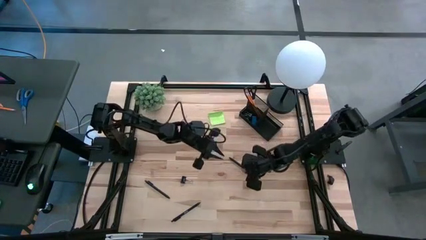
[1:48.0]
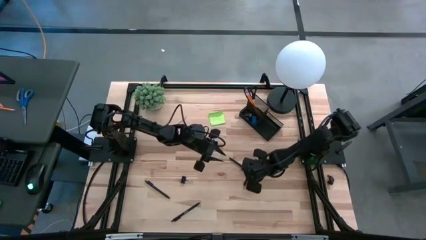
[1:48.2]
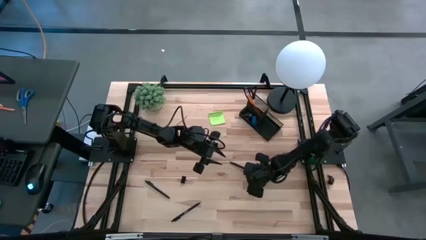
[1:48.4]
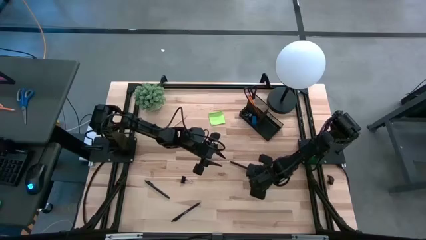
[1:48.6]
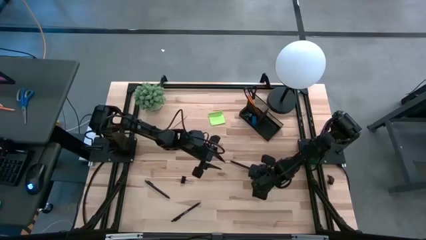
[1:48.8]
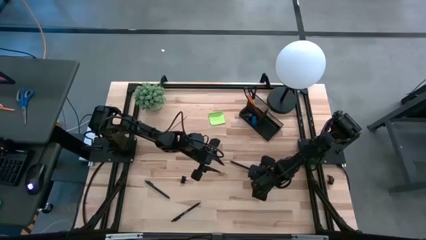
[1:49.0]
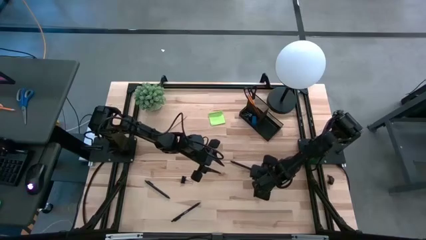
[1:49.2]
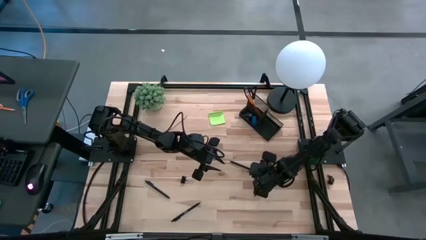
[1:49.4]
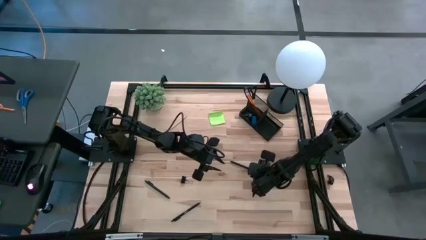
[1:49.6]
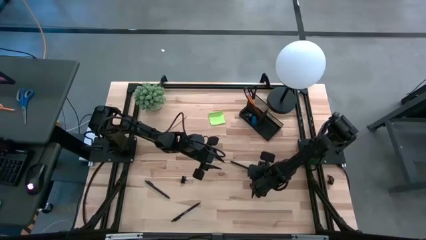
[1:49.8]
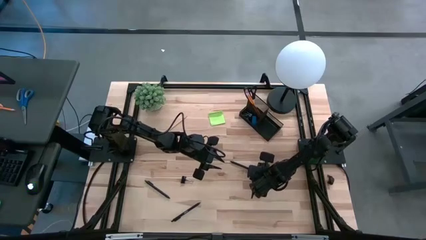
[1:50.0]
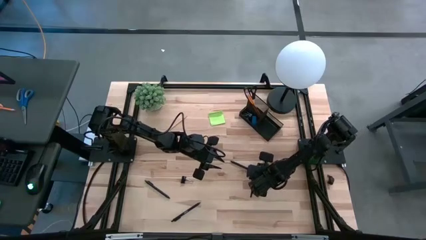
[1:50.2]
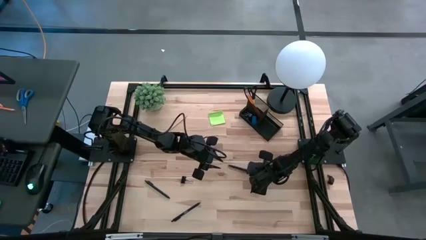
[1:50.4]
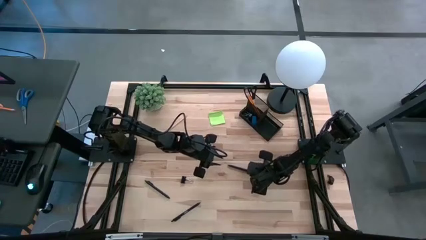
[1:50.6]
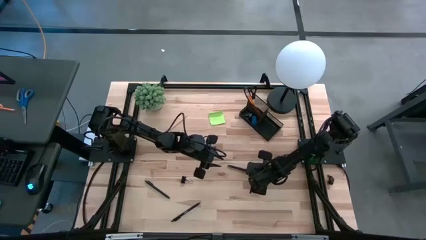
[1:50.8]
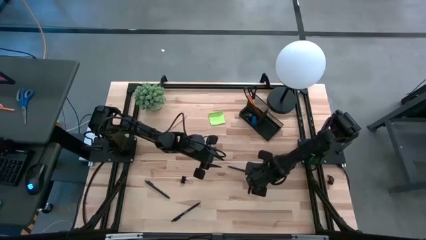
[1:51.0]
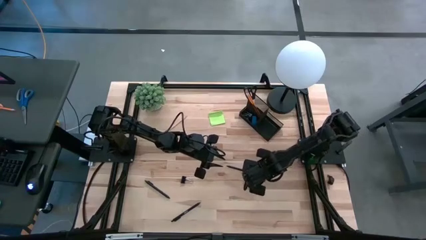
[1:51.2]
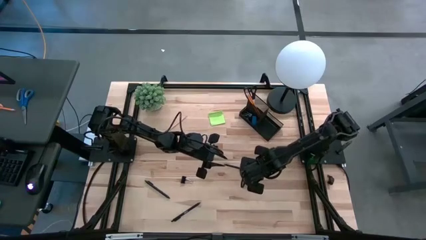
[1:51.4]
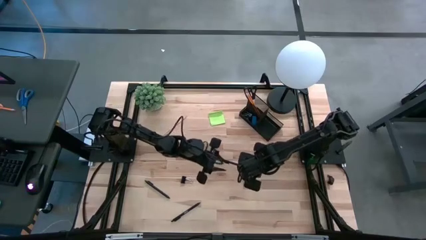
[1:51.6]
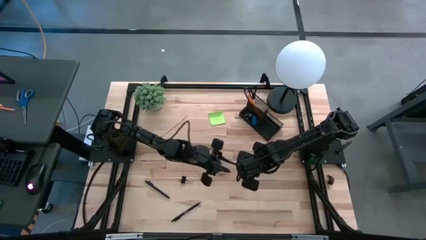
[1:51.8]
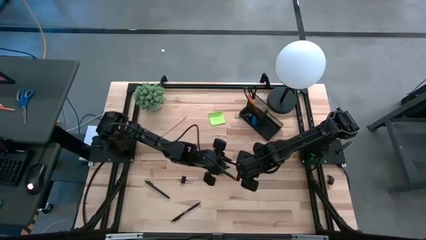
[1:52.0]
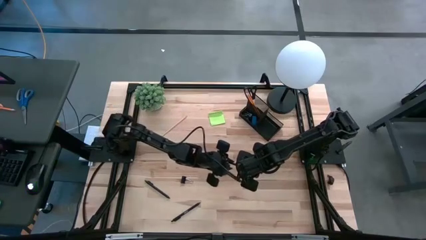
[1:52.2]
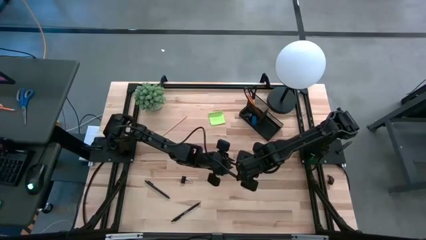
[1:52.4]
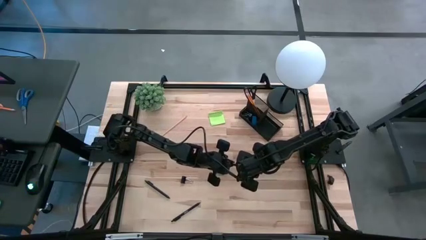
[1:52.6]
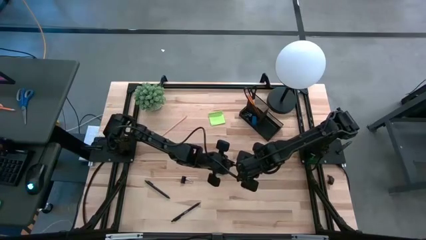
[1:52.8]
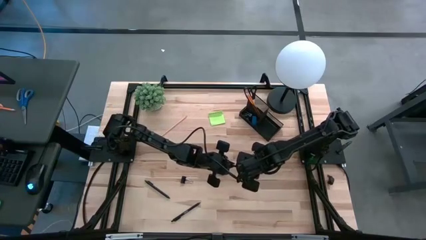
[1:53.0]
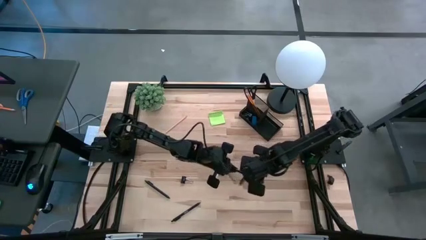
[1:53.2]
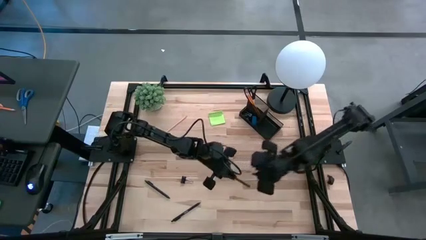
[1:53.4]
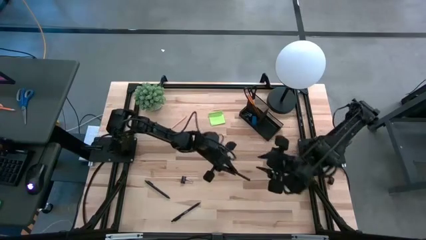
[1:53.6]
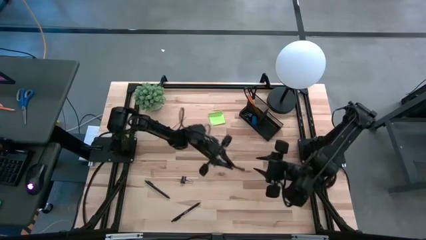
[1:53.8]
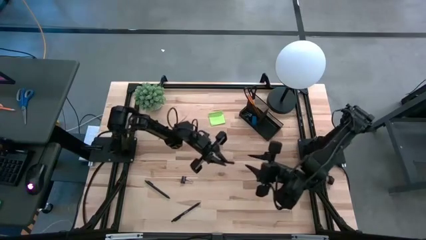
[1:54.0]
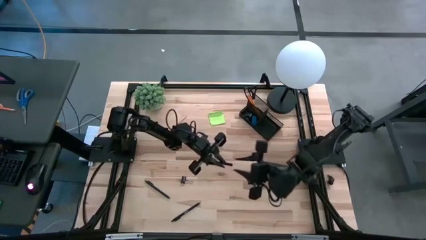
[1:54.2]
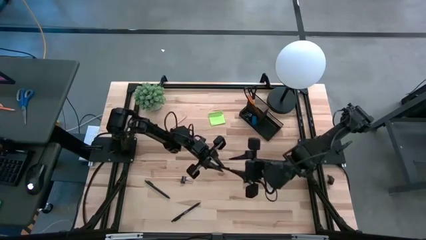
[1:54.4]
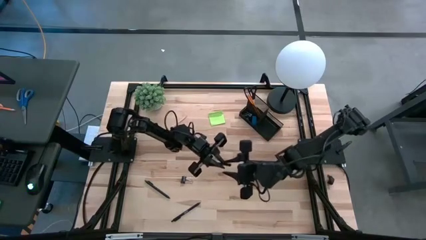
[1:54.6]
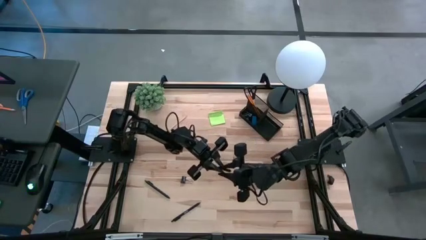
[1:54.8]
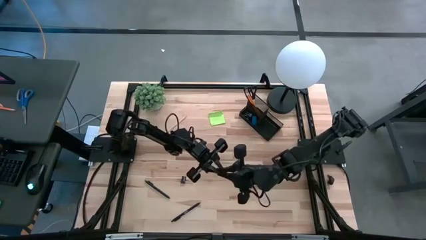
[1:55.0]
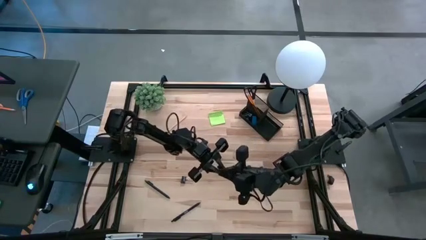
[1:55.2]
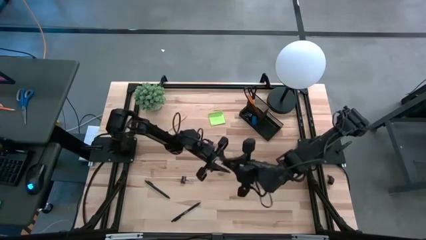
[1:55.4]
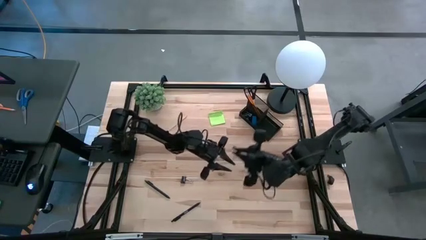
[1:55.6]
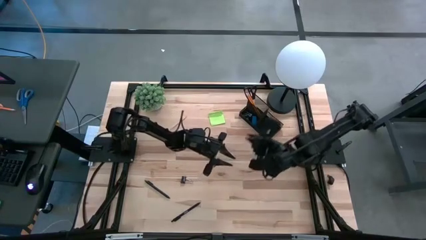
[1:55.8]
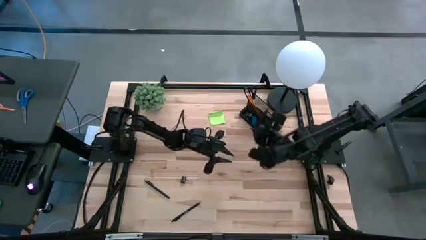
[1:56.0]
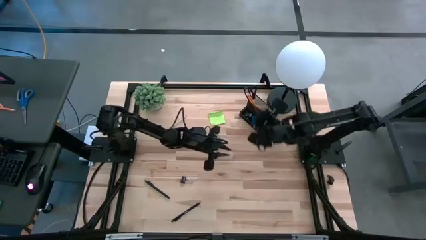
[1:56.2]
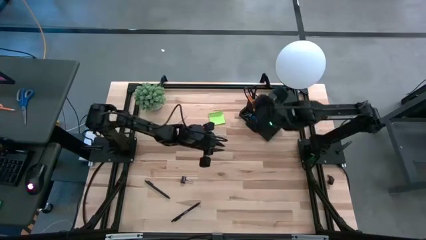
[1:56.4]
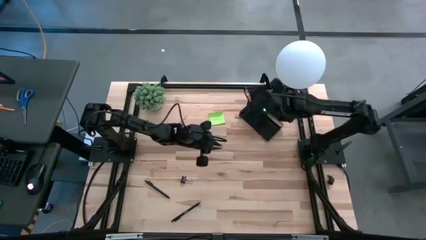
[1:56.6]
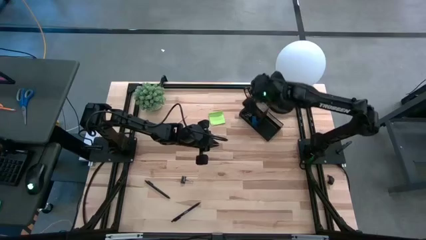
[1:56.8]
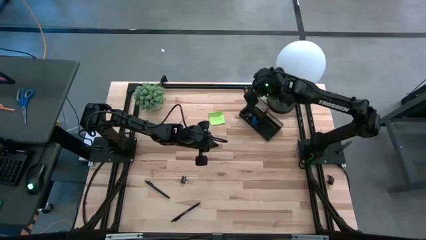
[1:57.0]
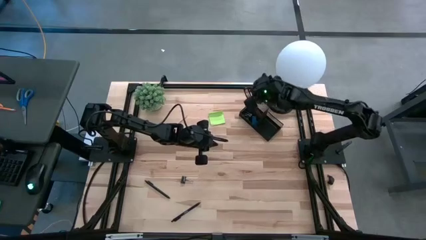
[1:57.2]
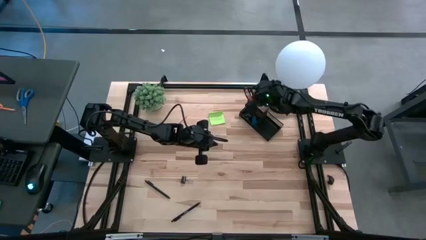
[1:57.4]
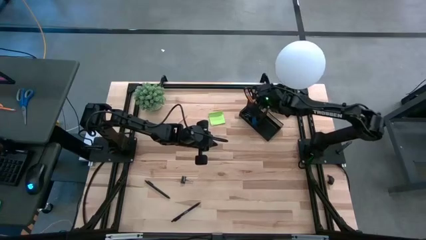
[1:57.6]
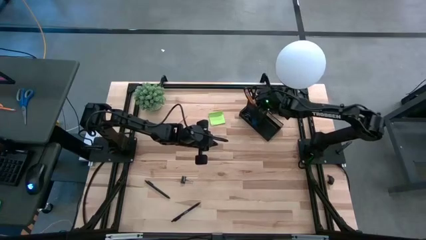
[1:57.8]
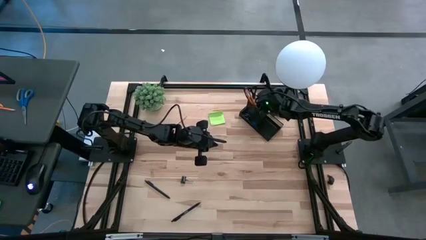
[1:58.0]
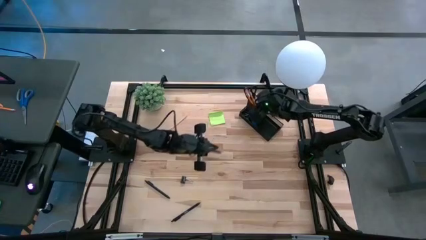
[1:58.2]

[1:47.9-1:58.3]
Task: Pick and place office supplies into organizer
Put the black pen into the black desk organizer

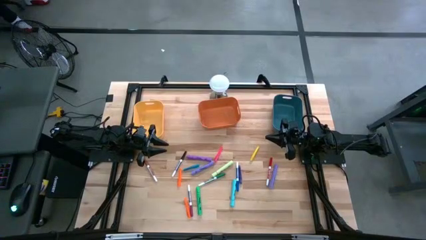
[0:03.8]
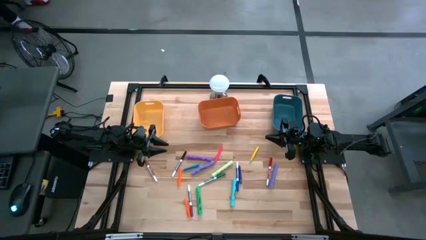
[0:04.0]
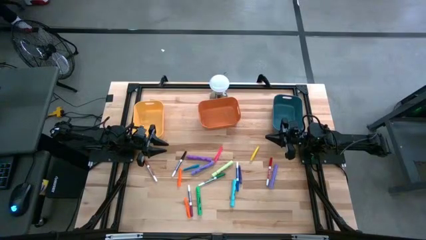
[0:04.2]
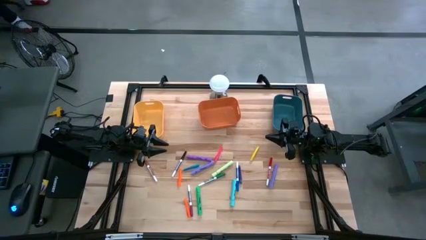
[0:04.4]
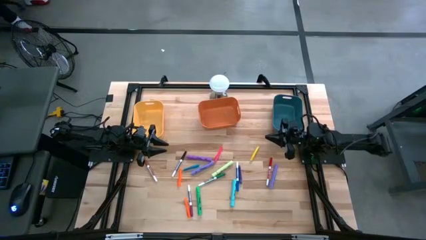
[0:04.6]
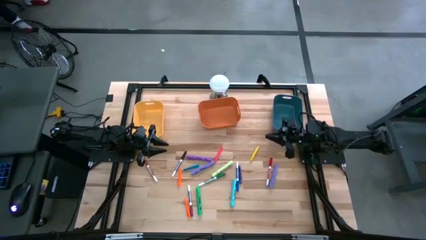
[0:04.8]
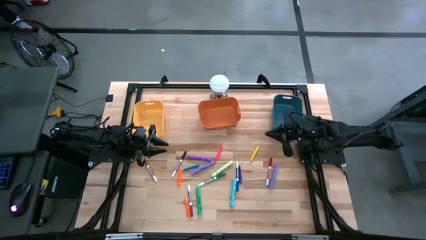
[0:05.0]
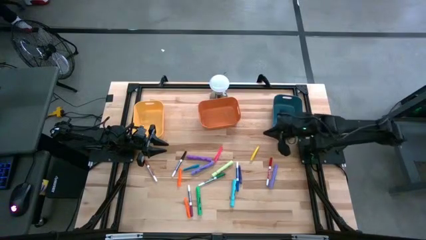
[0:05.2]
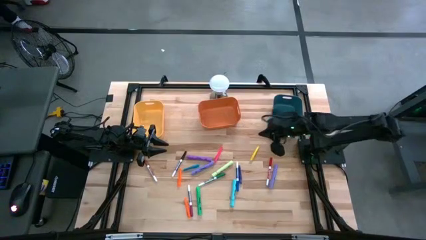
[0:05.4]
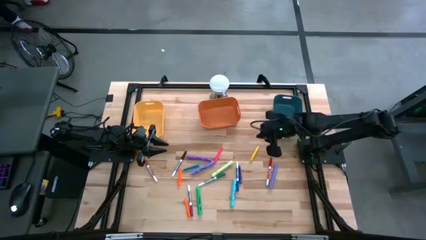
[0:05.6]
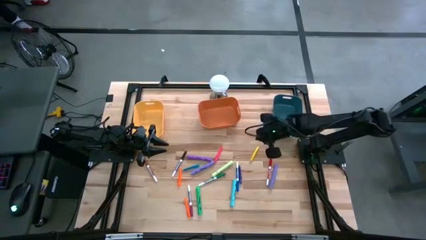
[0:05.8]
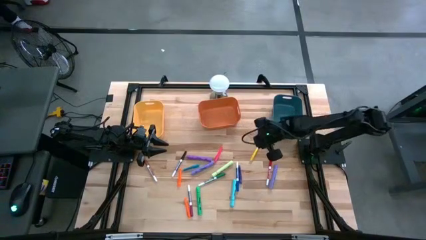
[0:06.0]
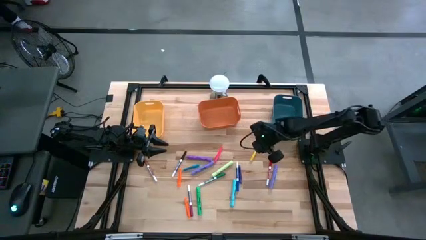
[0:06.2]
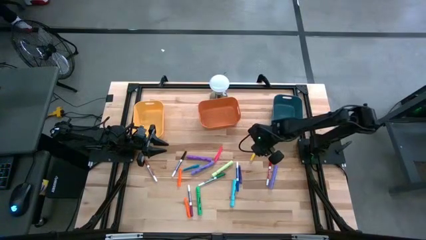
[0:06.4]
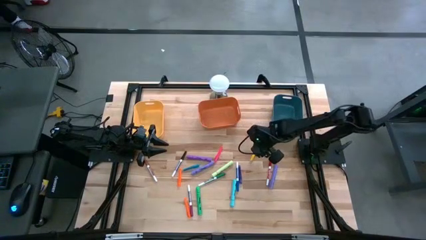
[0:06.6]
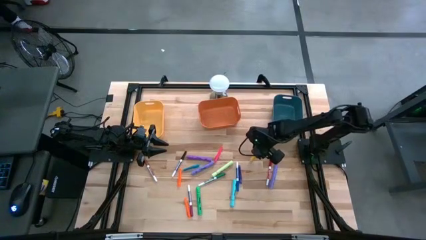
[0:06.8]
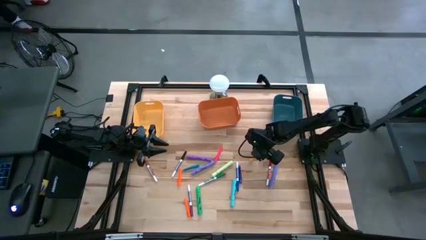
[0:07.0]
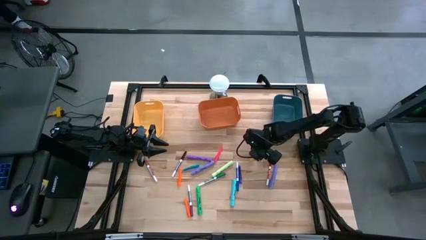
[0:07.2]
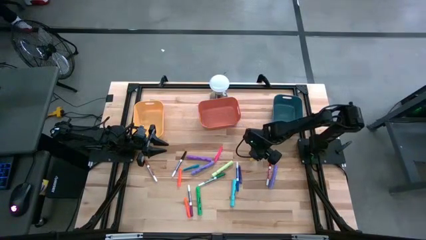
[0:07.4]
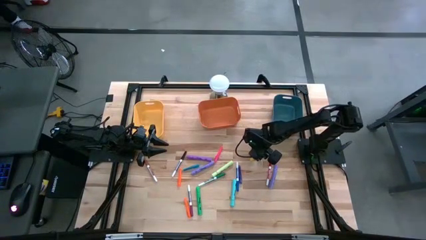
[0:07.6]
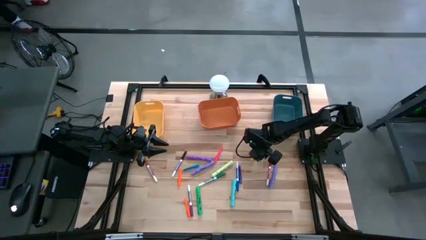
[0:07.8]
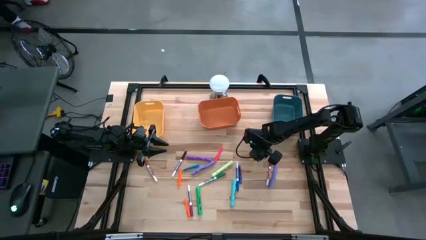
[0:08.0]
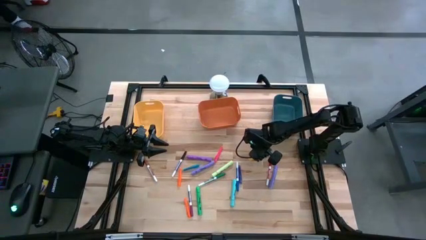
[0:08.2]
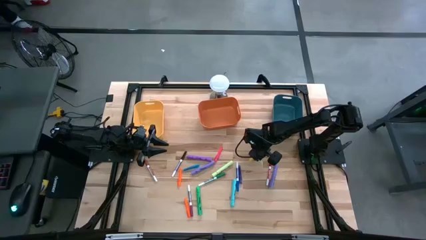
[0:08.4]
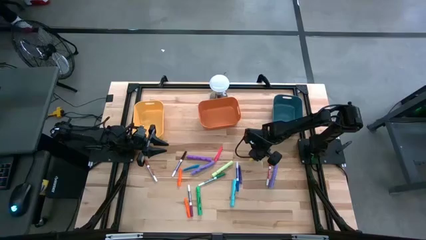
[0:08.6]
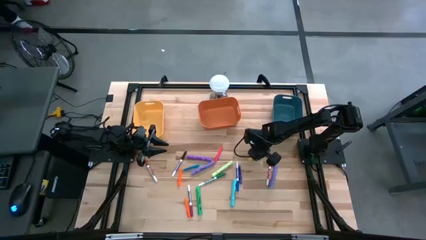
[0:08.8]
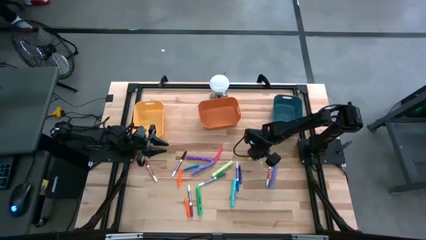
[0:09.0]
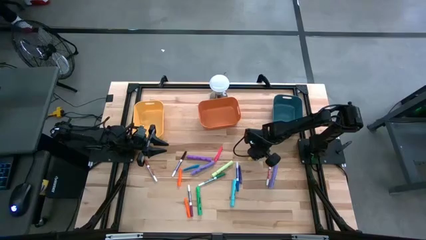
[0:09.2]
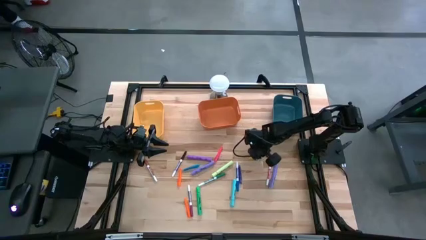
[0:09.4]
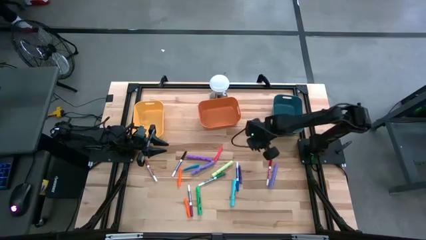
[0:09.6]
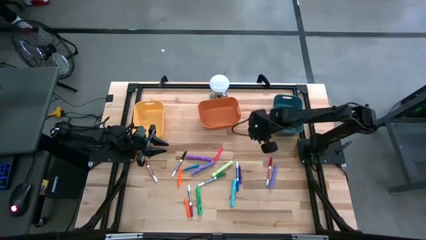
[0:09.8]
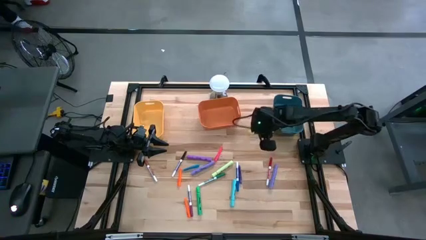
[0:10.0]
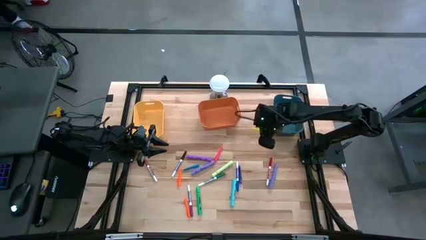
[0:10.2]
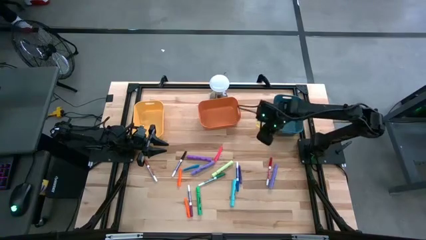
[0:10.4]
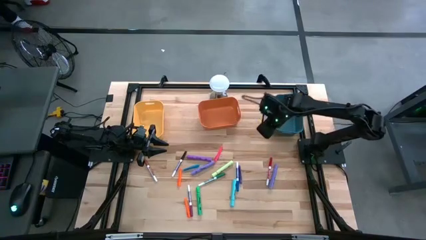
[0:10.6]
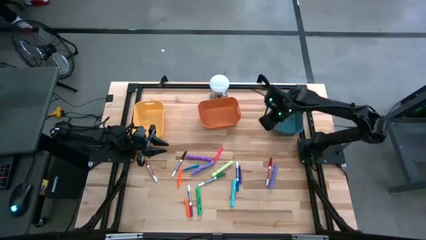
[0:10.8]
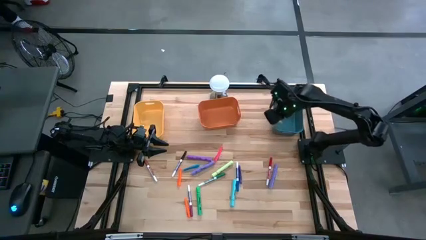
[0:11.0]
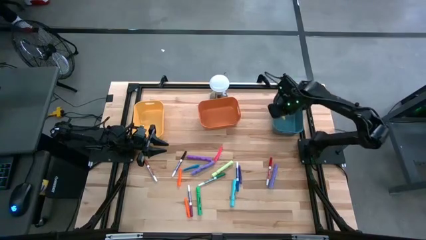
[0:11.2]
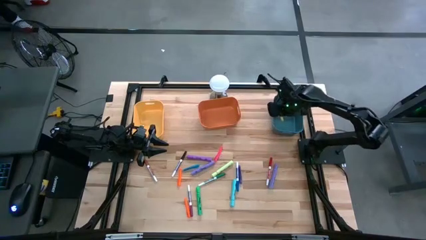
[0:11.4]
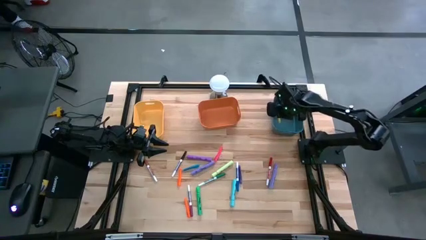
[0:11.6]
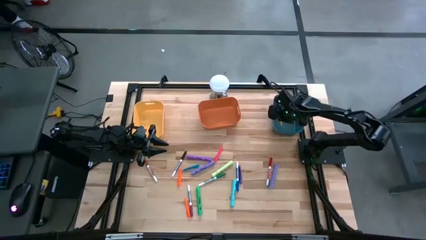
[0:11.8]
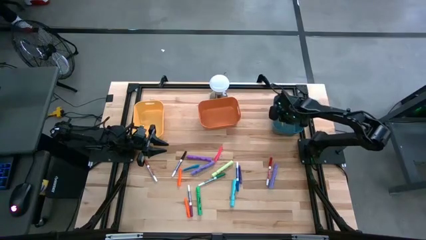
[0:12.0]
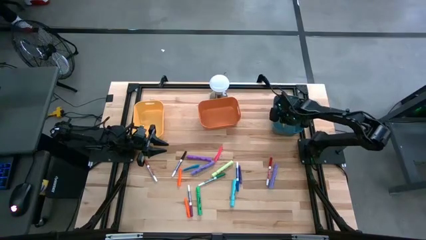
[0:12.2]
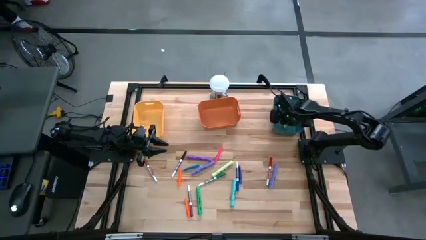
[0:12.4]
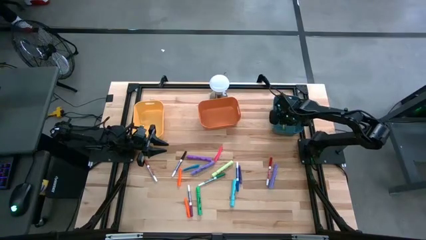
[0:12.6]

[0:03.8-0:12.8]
Task: Pick & Place Markers
Put the yellow pen into the blue bin
